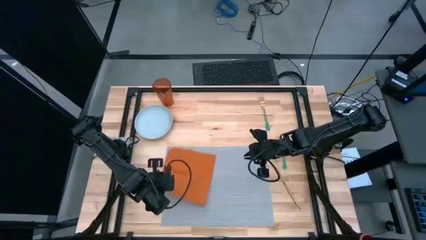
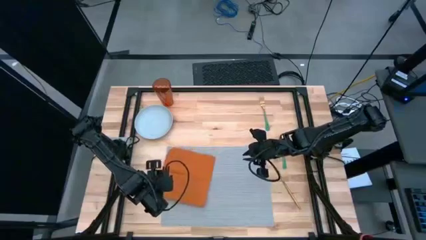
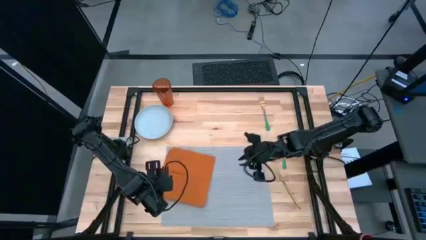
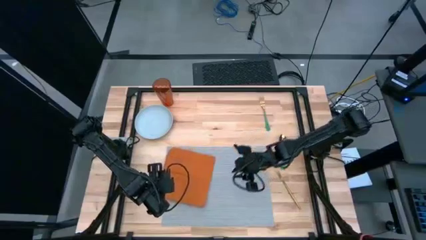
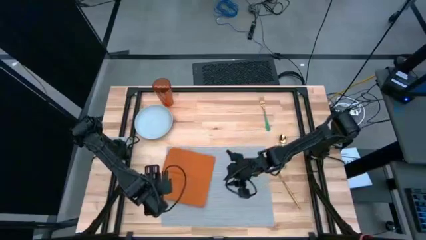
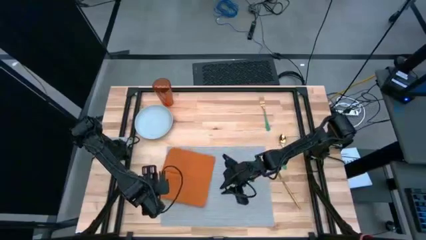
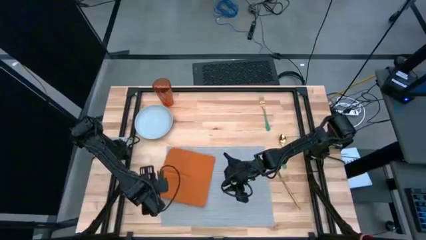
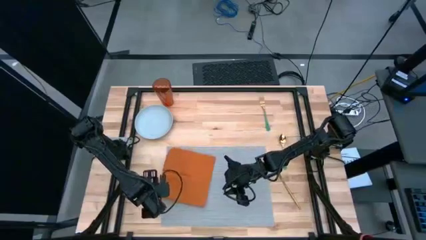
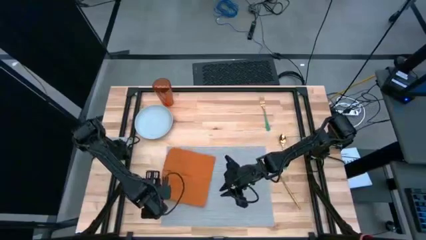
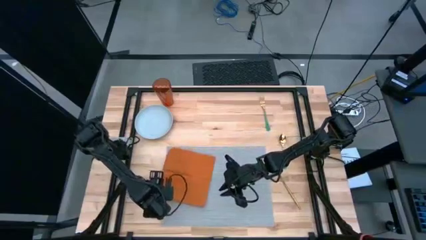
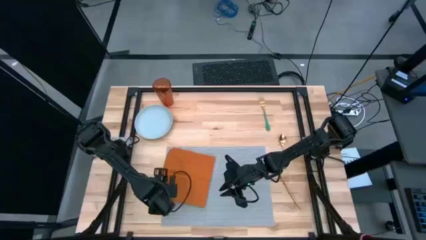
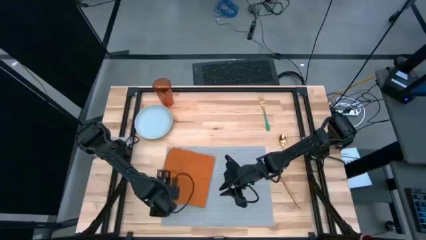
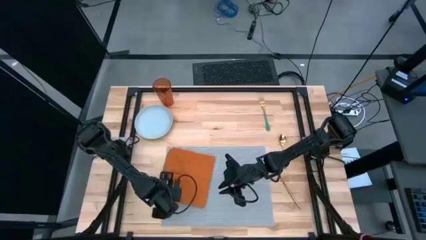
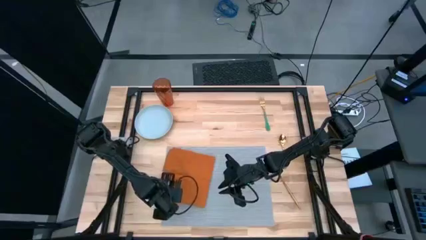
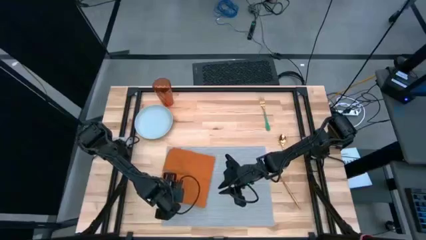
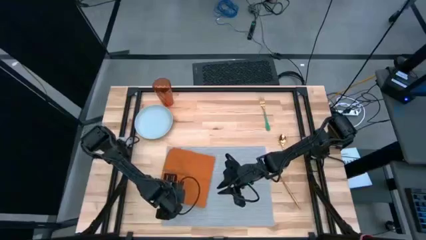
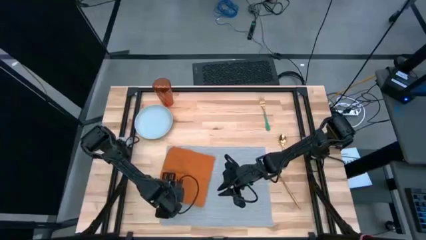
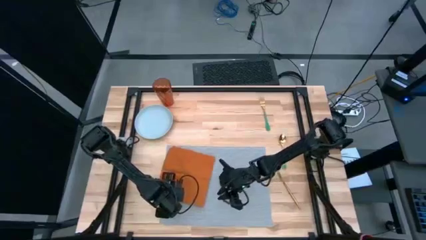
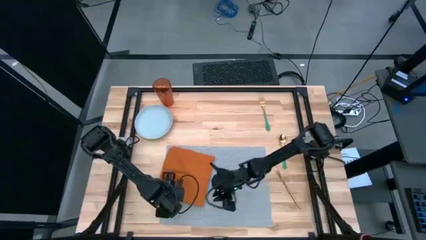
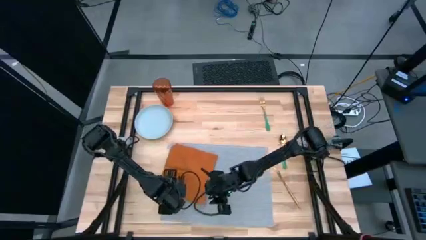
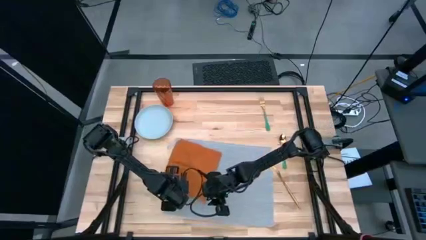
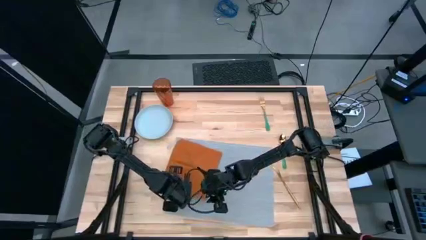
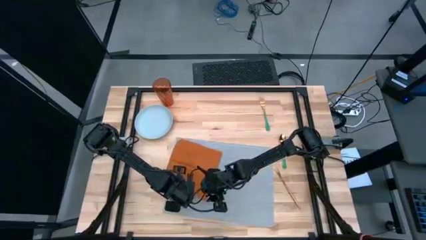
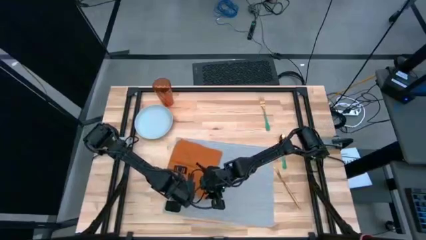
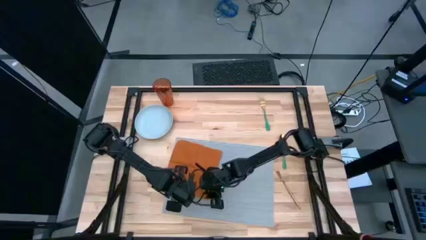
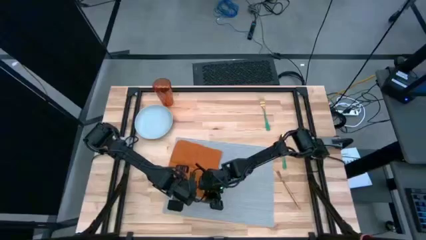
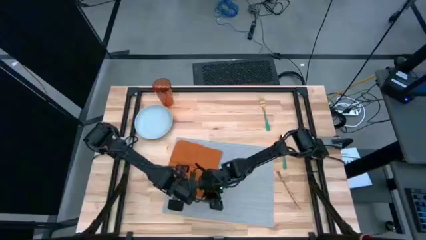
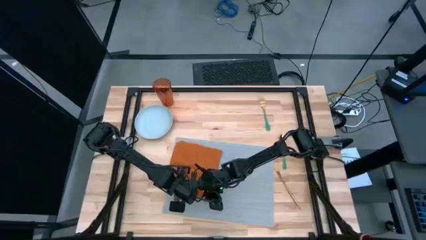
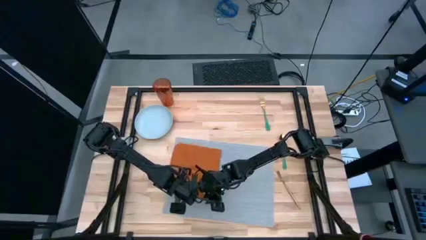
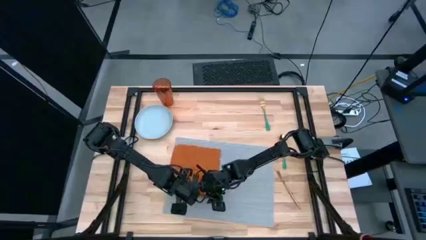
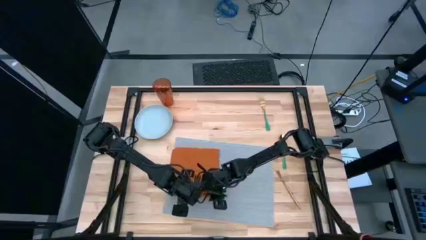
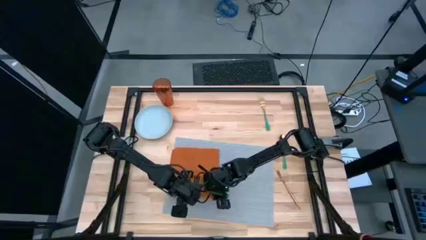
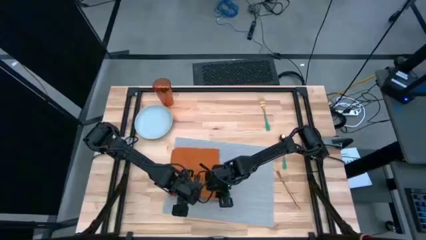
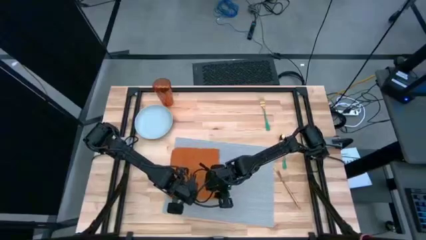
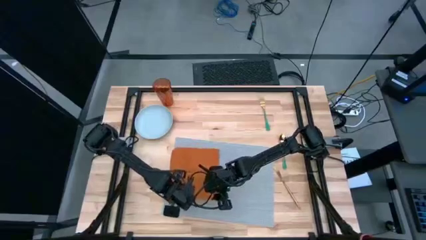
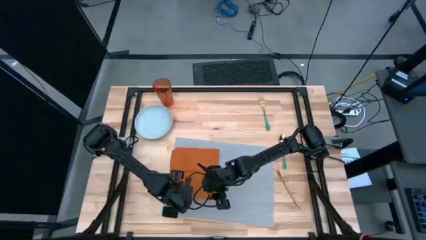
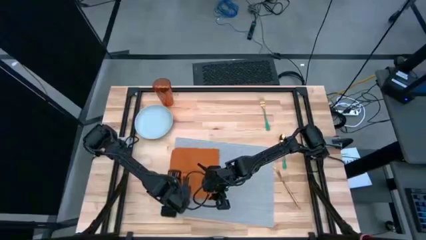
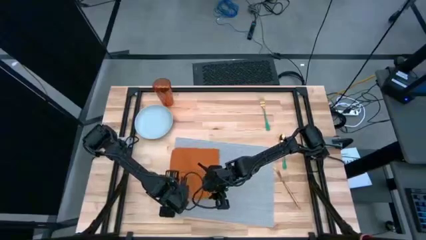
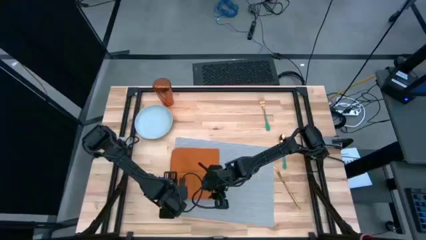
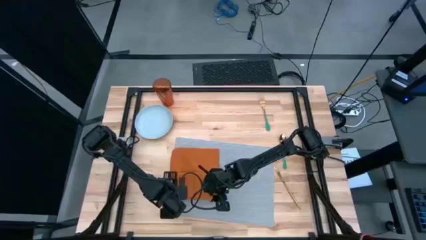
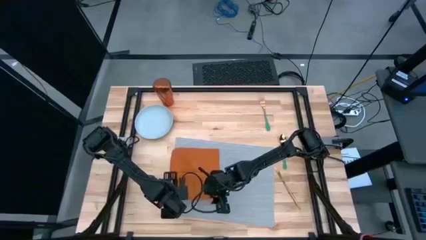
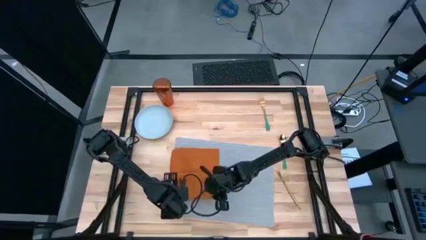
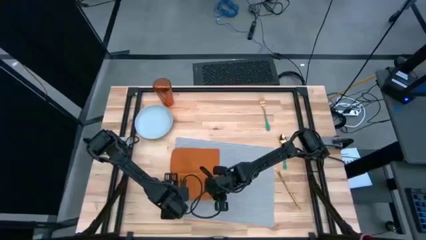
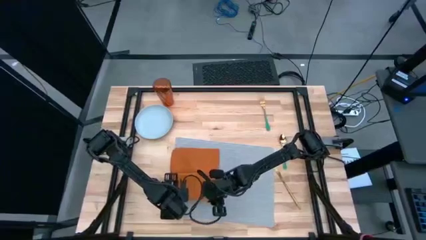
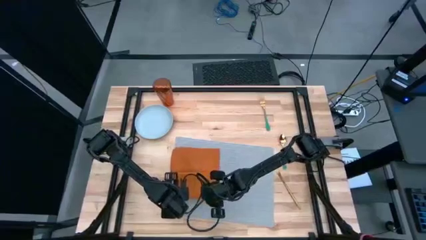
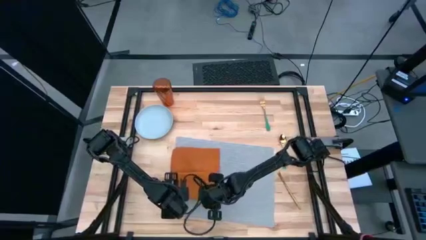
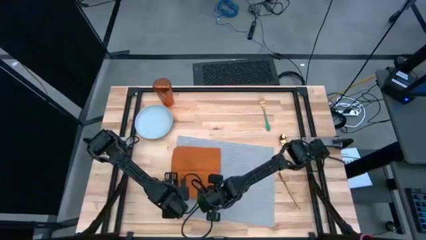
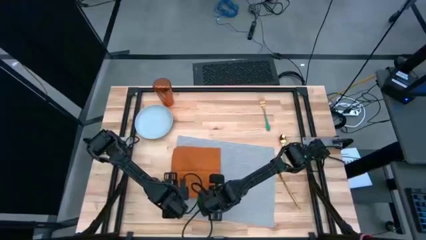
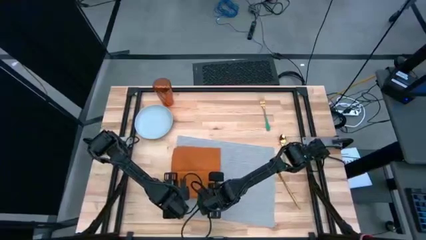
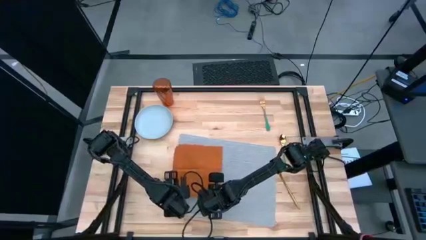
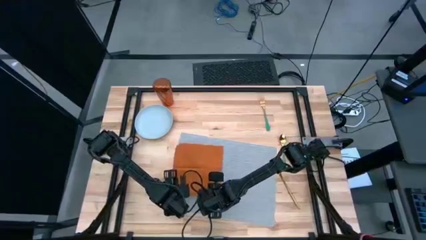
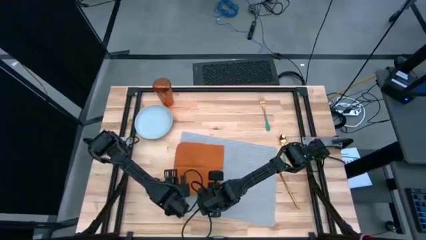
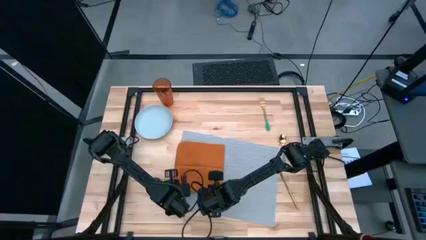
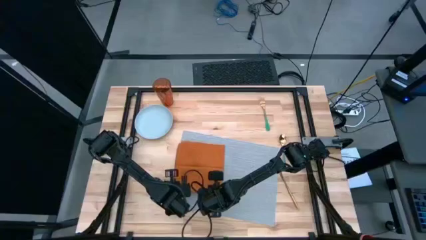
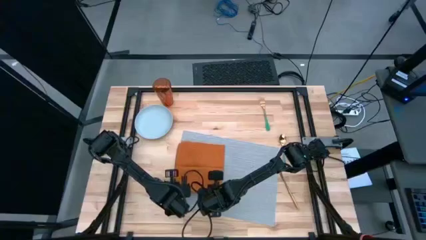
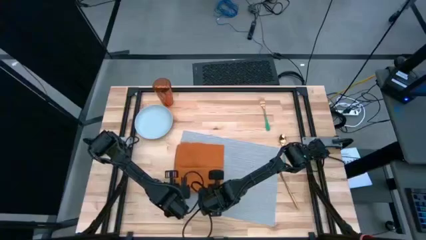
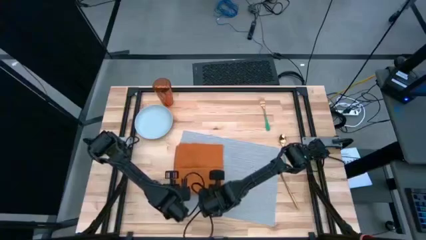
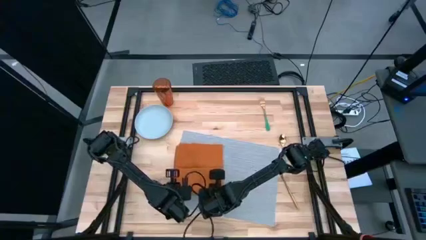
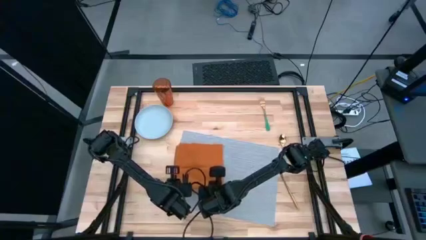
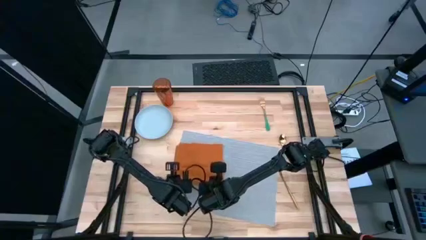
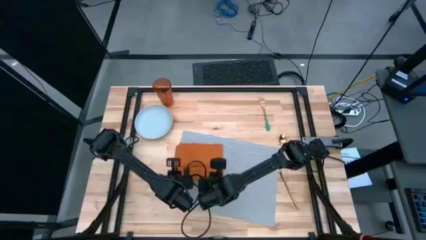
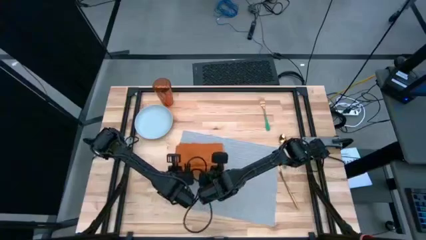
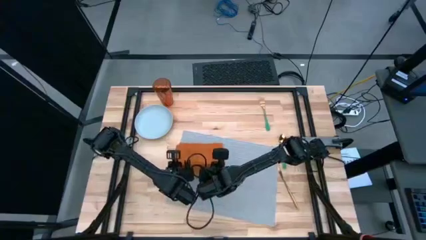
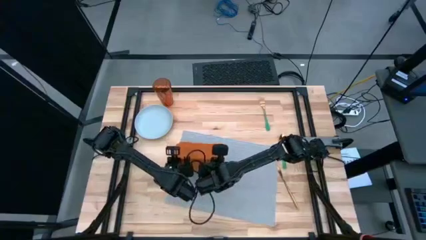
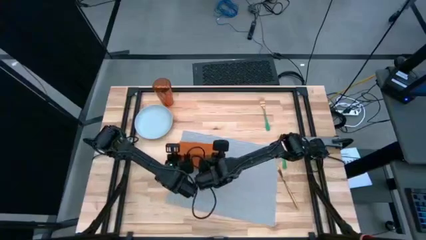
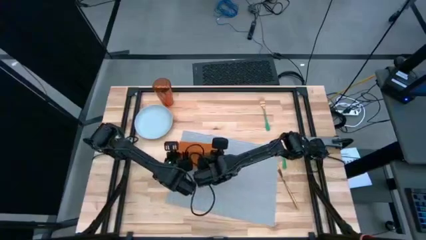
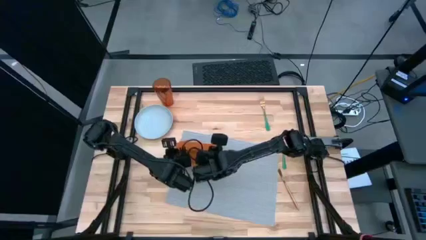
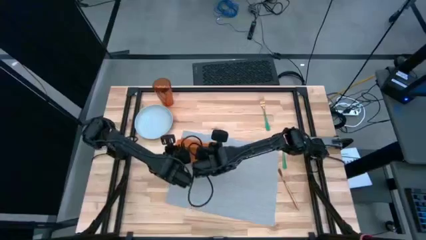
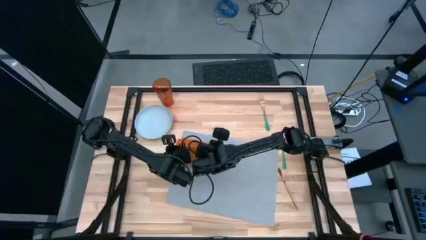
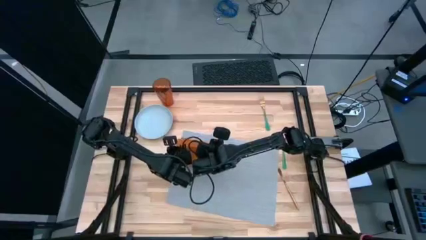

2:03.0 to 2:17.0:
Task: Set table place
Fold the orange napkin

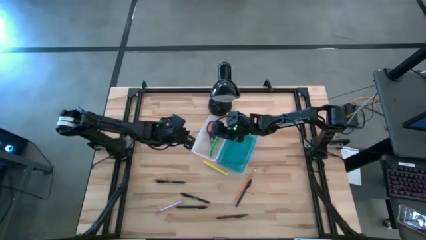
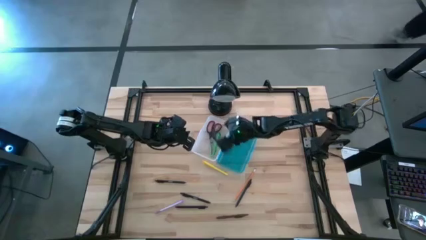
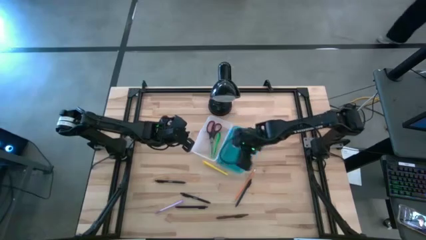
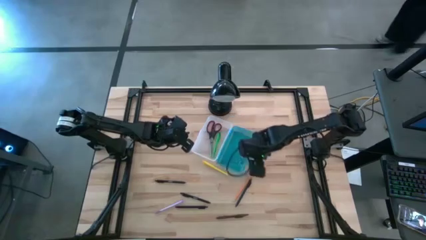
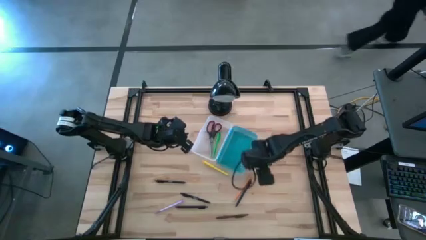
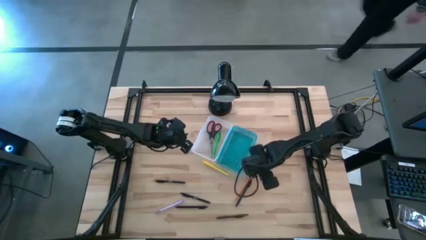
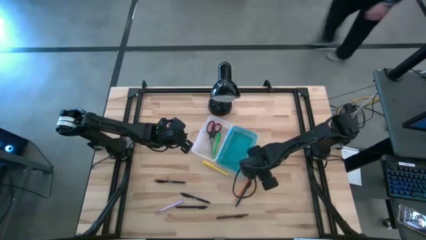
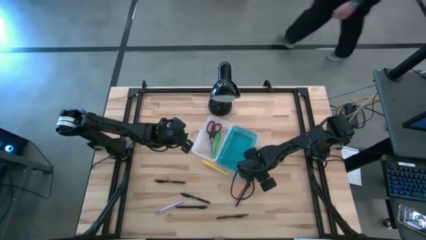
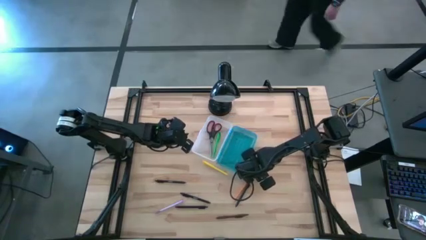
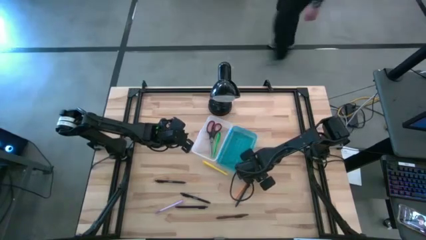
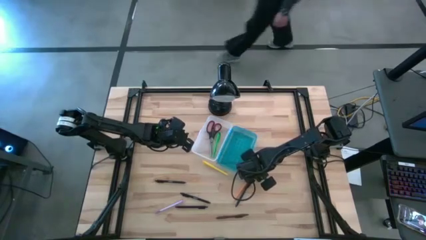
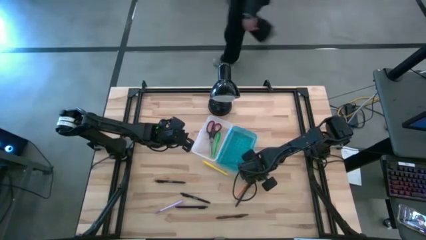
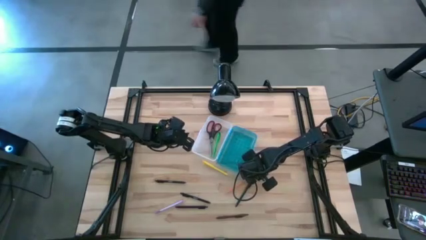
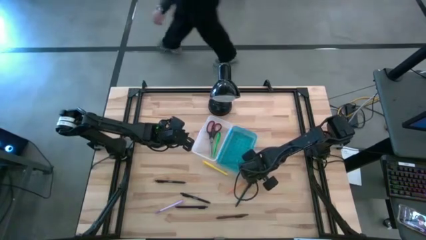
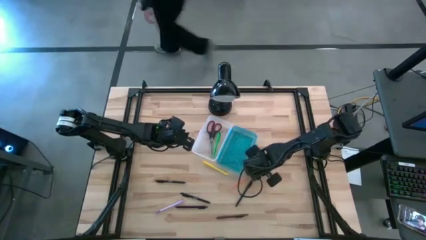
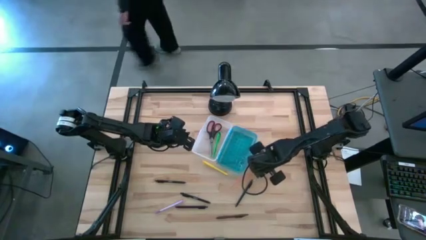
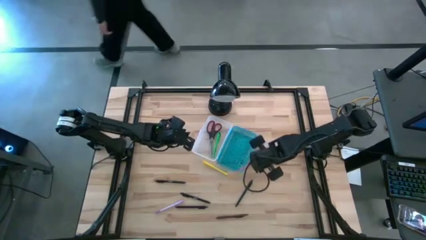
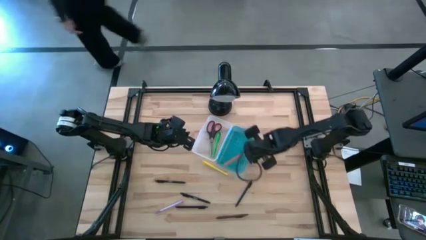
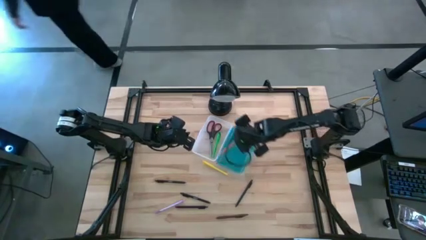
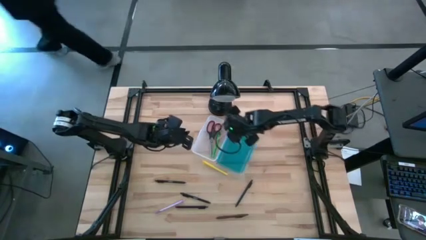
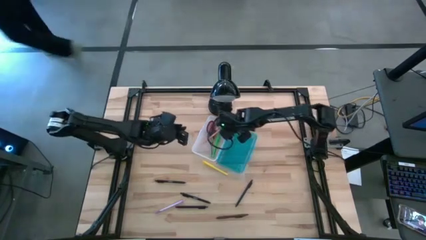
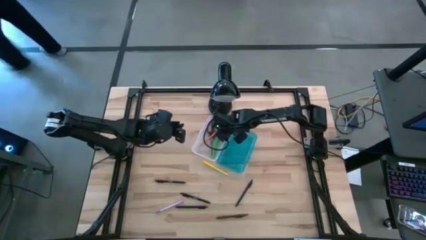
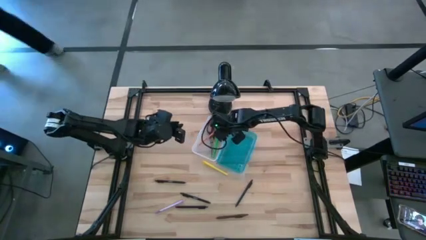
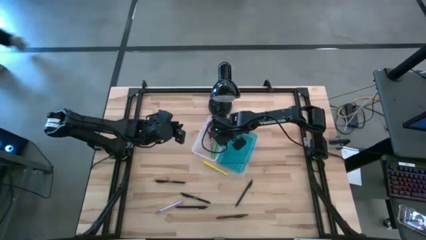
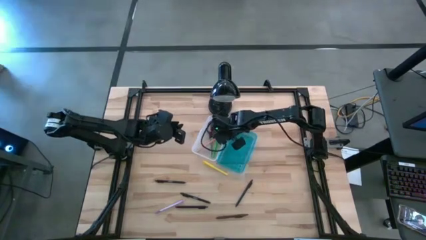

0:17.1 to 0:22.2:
Task: Pick & place school supplies into a supply box
Put the orange pencil into the supply box
